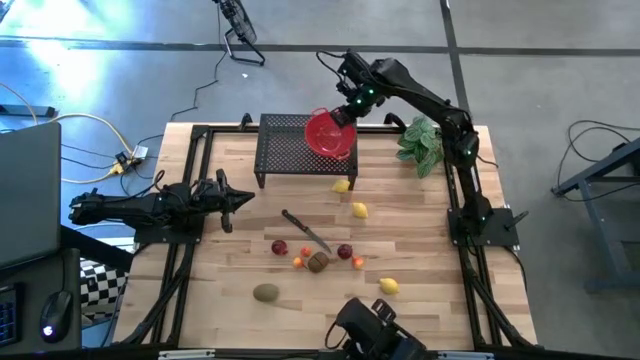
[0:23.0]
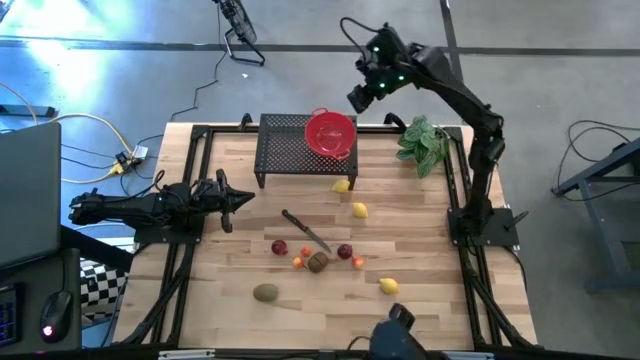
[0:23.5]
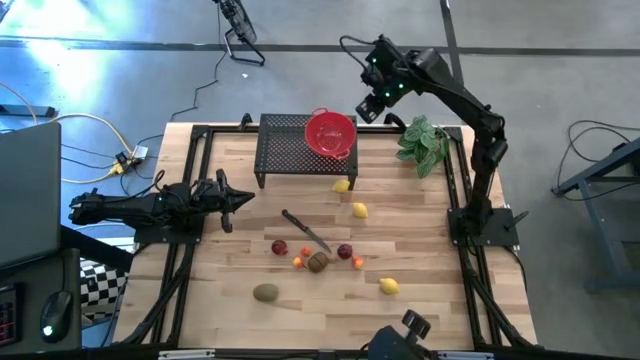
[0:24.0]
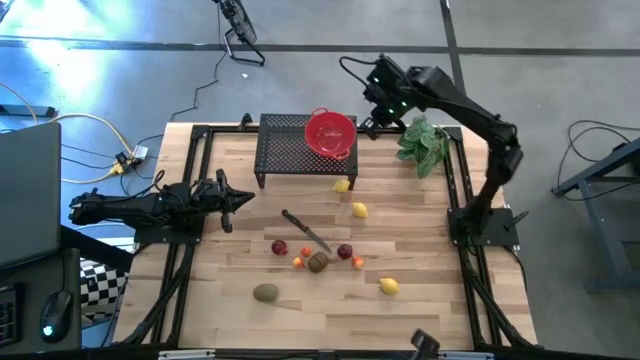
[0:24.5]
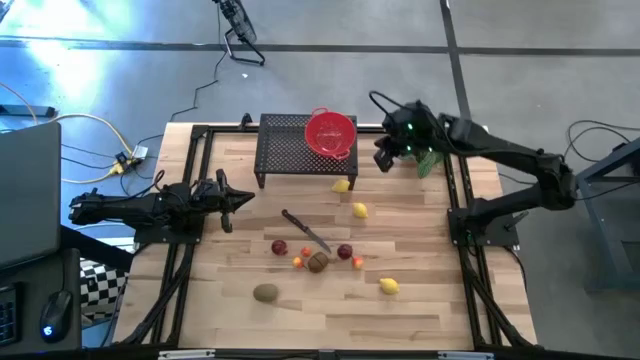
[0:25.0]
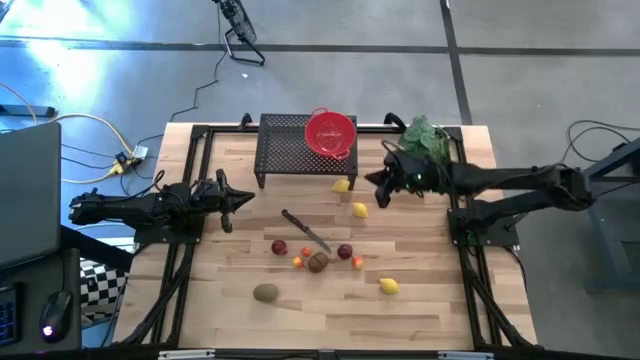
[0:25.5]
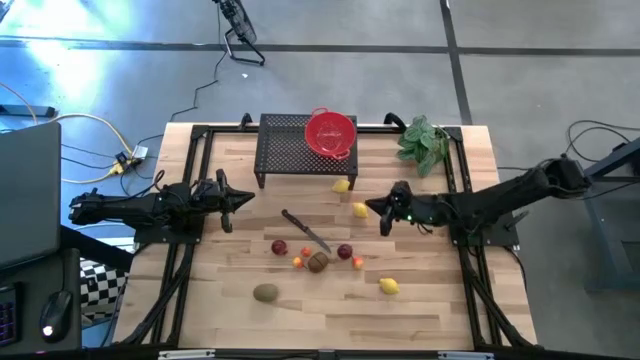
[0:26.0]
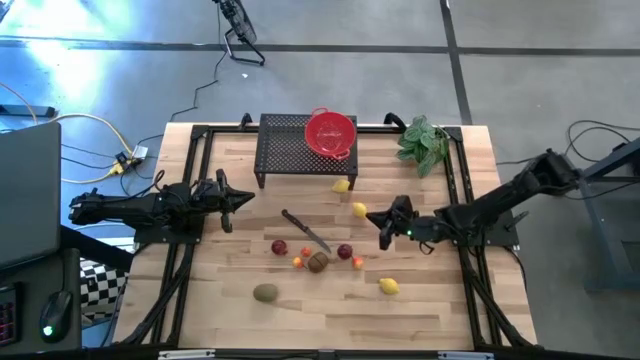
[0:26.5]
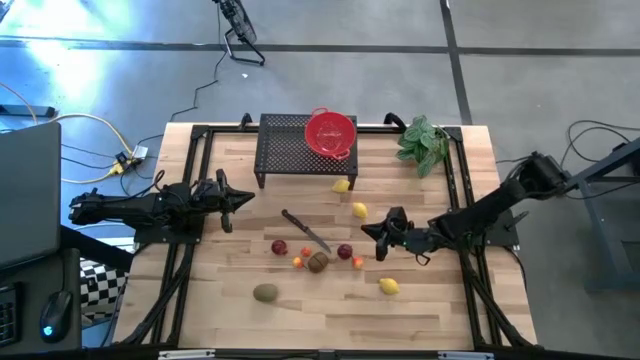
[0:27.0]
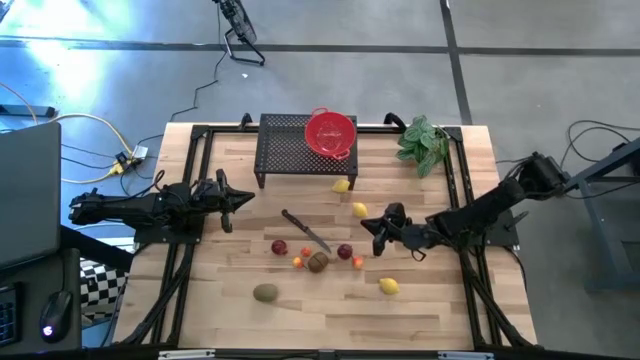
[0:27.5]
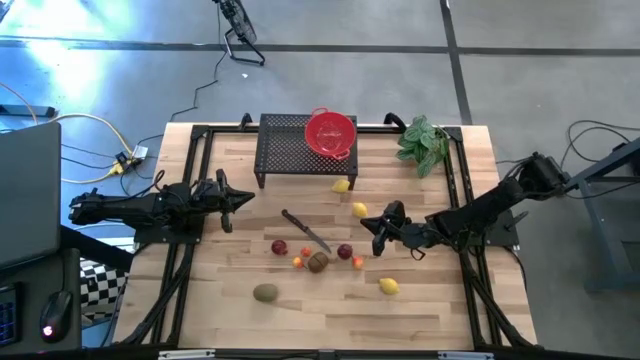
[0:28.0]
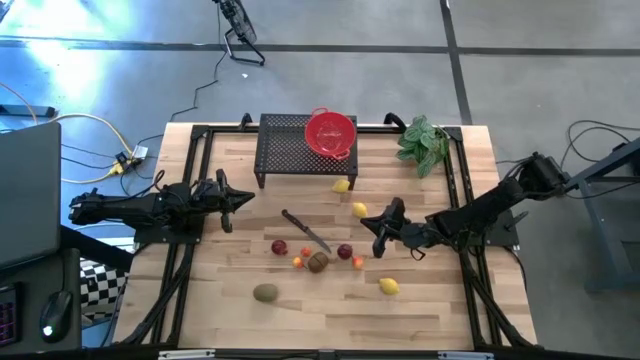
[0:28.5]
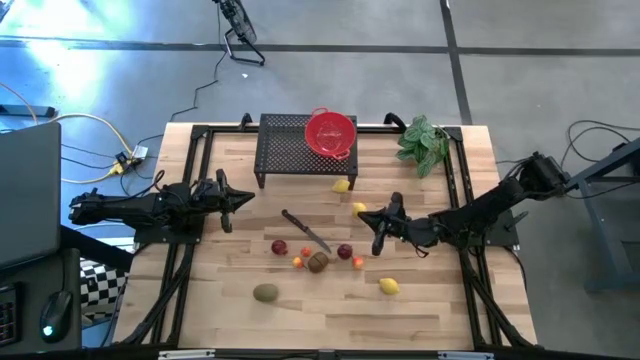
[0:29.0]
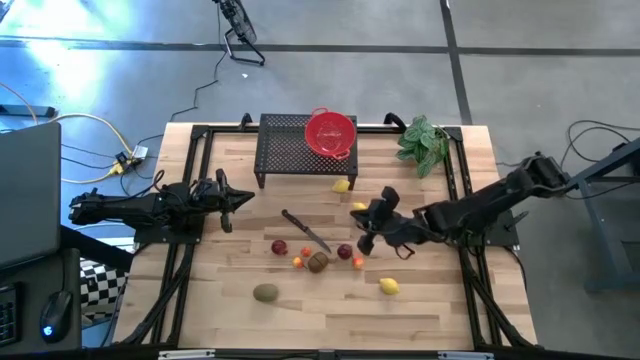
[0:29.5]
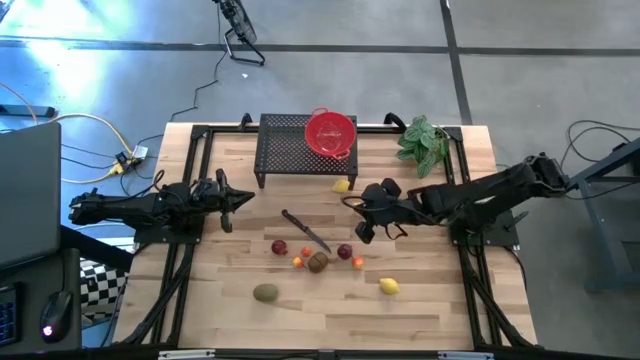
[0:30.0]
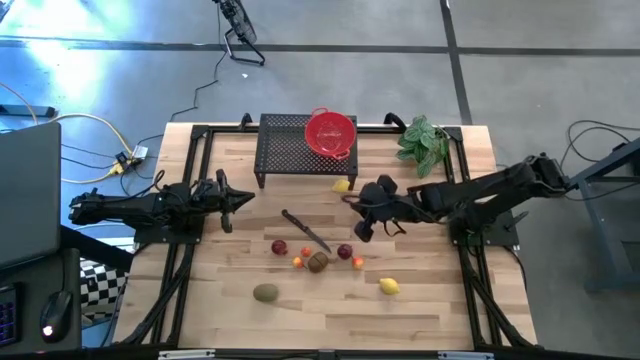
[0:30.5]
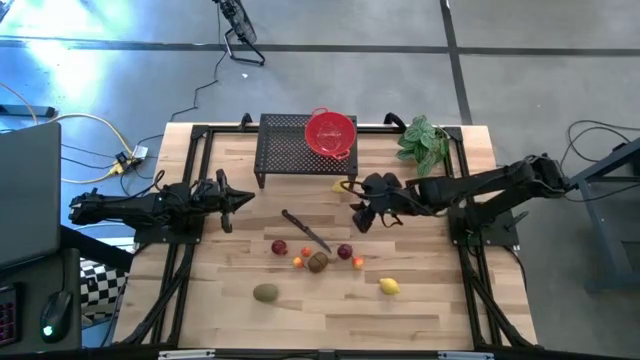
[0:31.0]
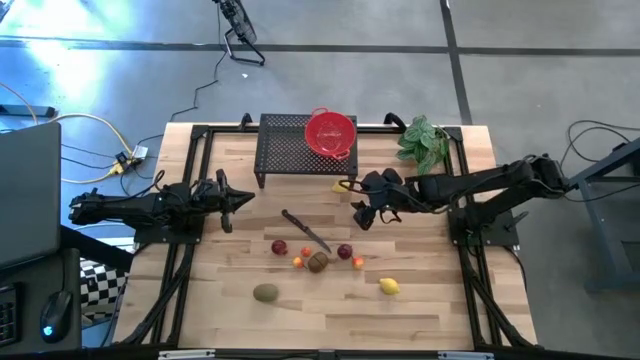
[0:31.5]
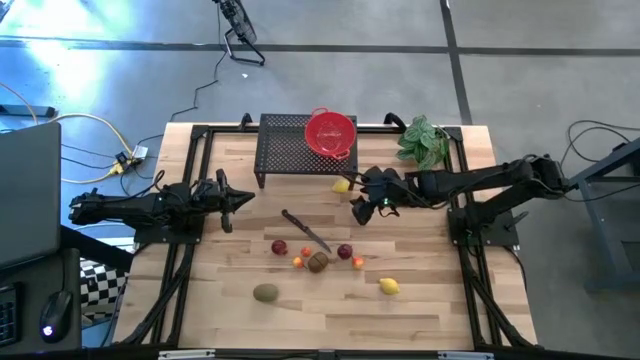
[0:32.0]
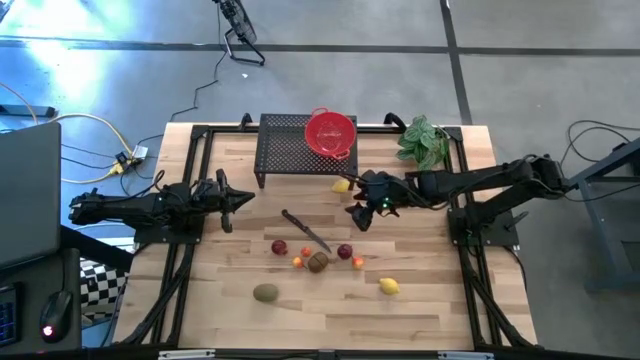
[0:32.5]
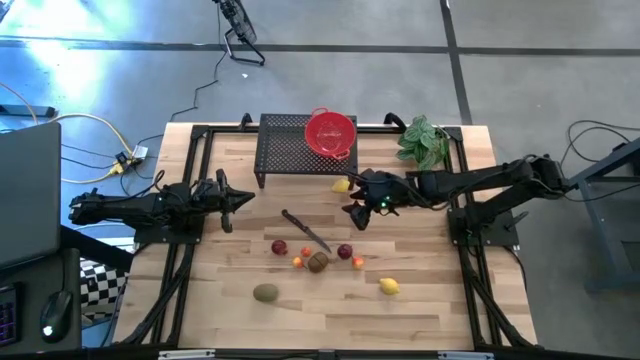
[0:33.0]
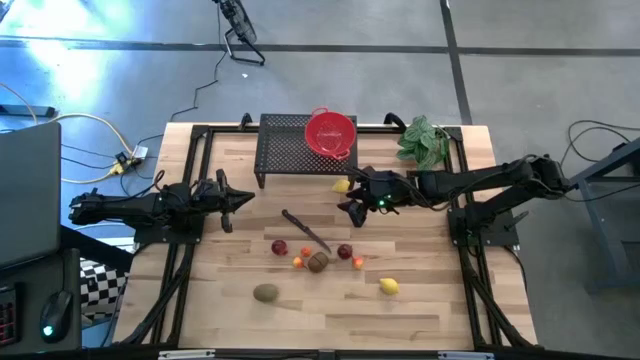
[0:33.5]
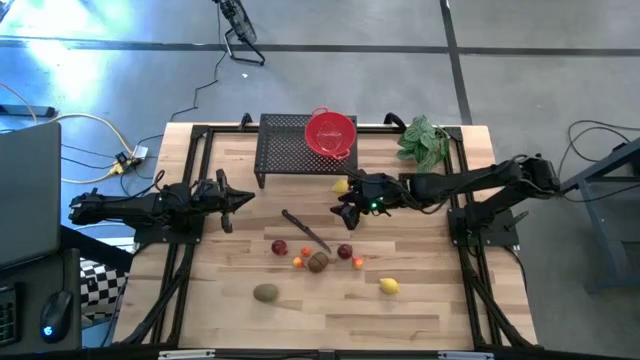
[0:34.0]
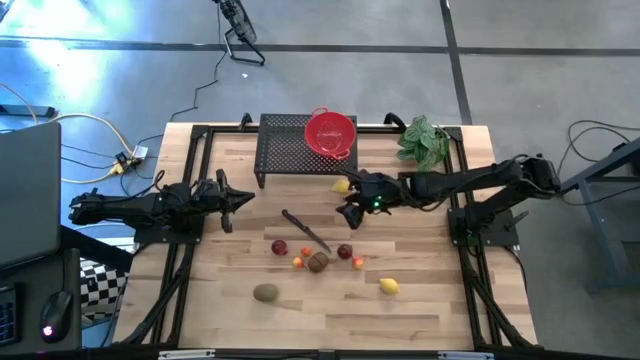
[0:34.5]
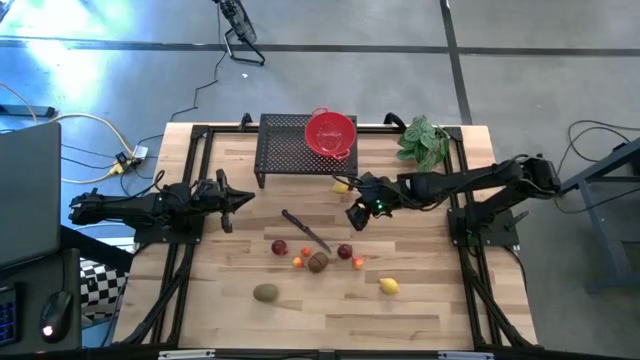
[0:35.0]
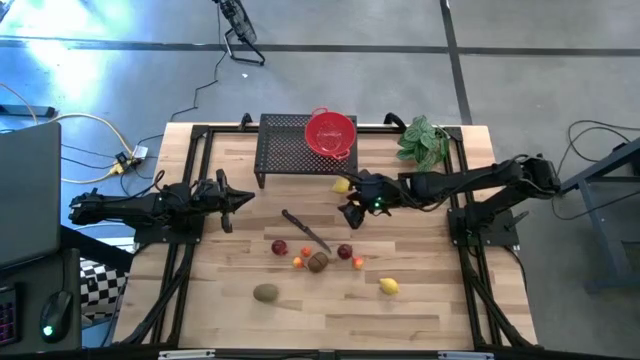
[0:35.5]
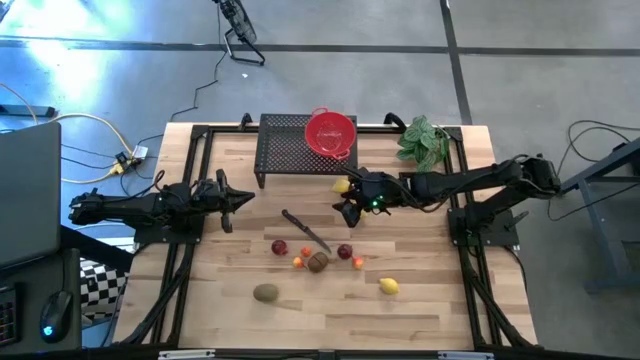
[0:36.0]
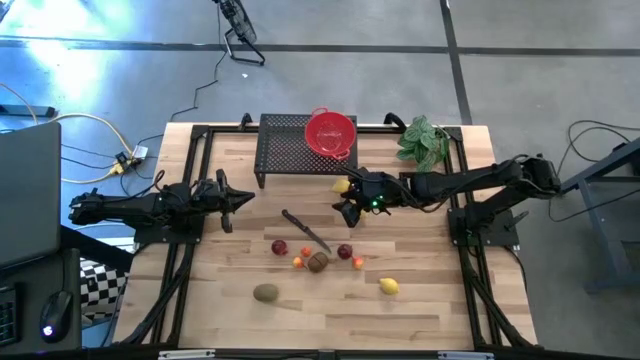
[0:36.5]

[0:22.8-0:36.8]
Task: Pick & Place Fruit
Put the middle lemon into the colander on the shelf on the shelf

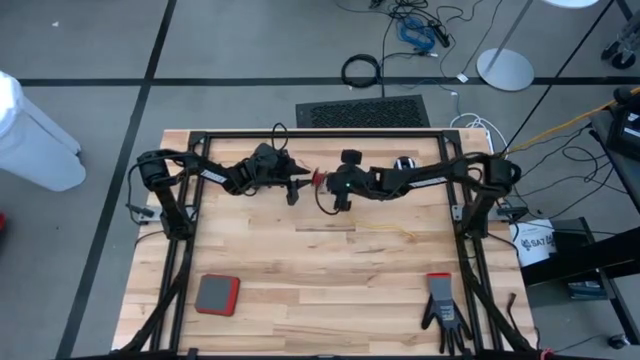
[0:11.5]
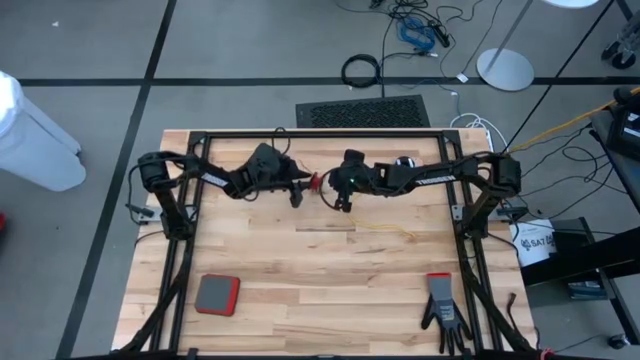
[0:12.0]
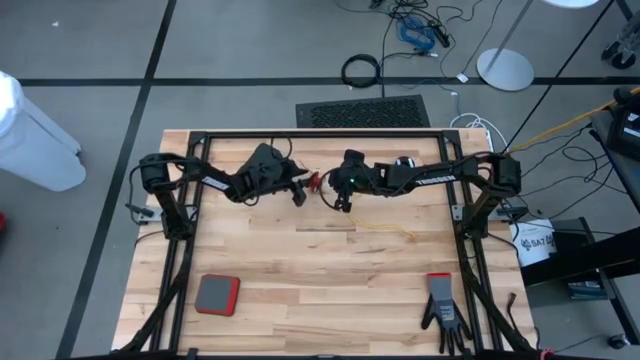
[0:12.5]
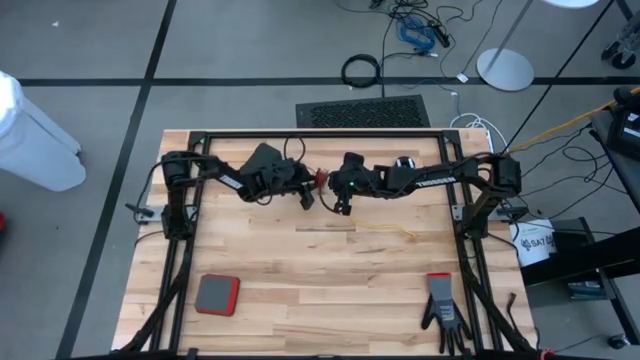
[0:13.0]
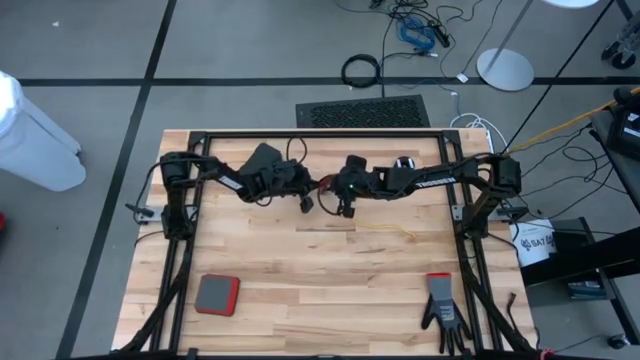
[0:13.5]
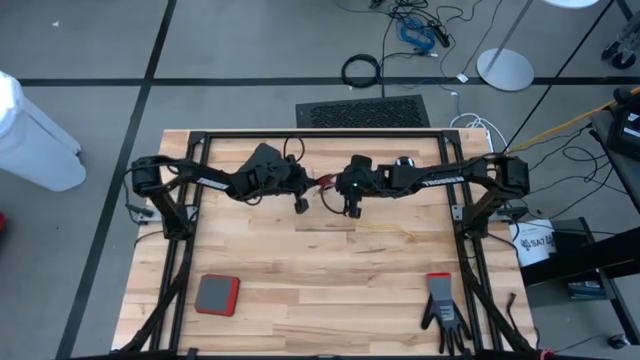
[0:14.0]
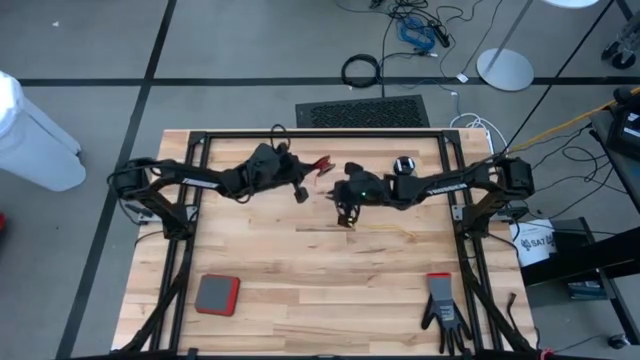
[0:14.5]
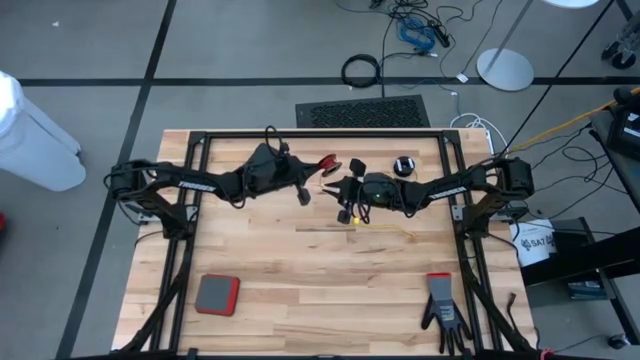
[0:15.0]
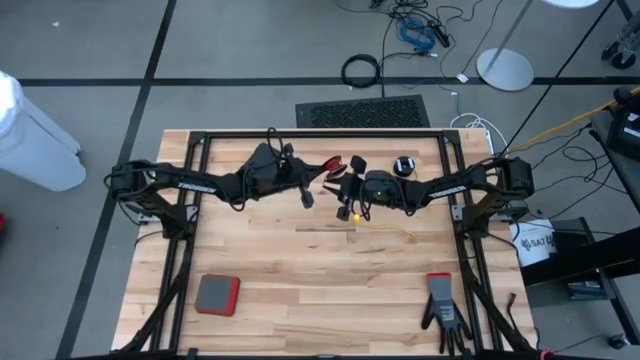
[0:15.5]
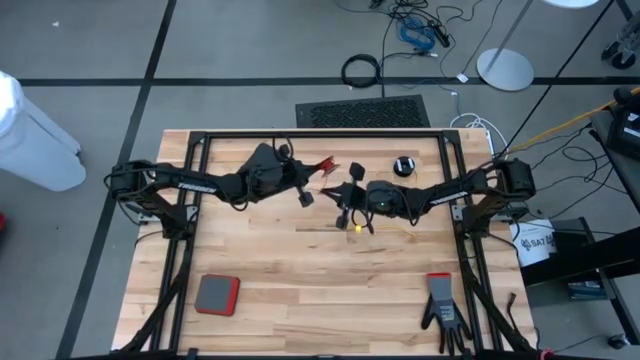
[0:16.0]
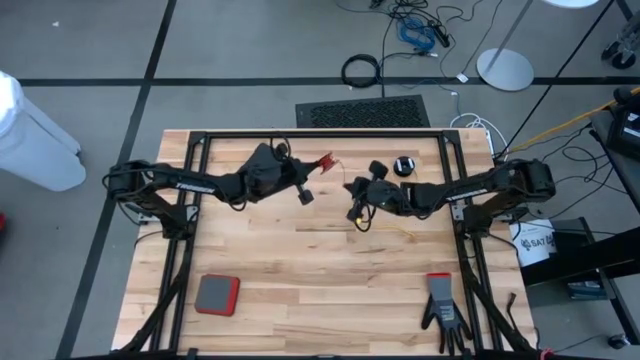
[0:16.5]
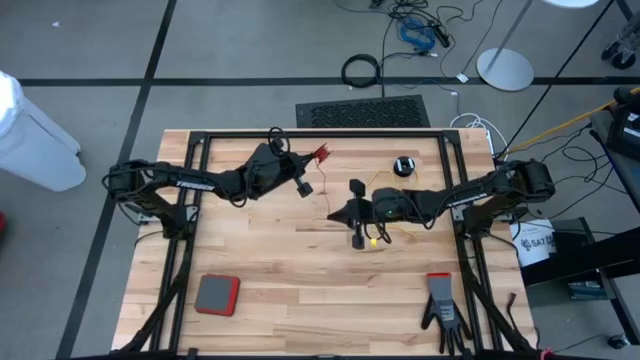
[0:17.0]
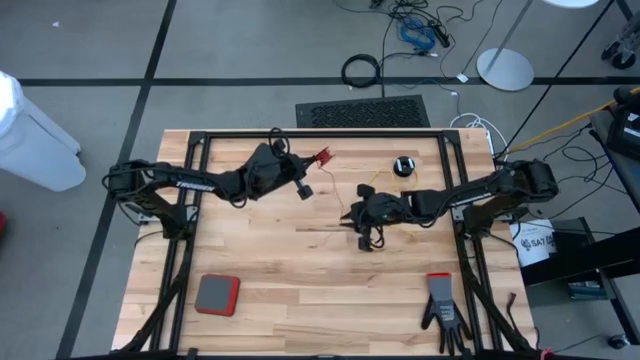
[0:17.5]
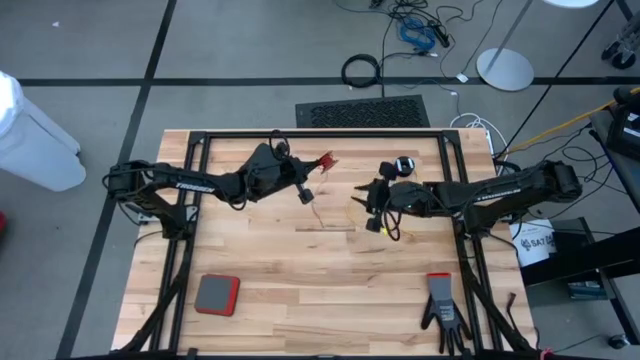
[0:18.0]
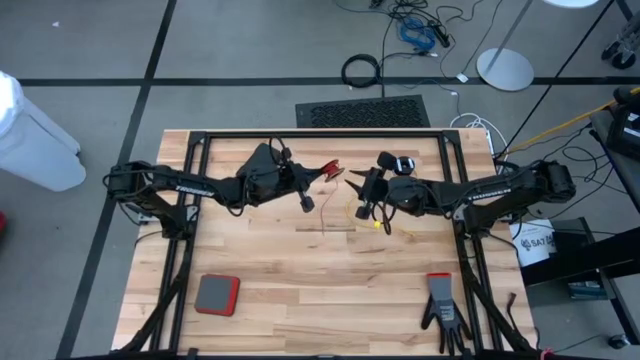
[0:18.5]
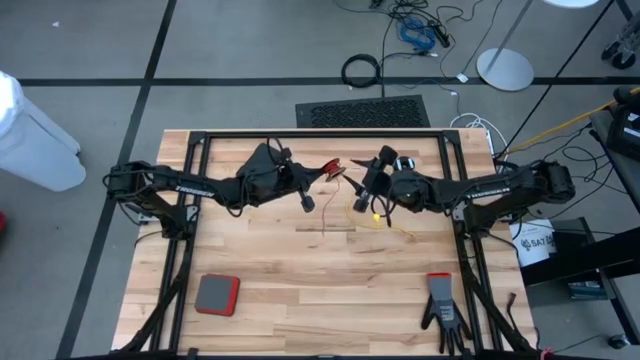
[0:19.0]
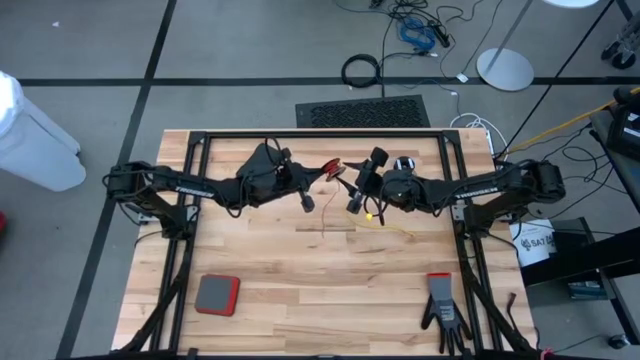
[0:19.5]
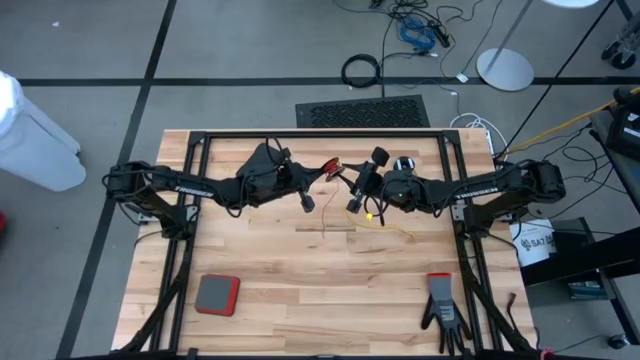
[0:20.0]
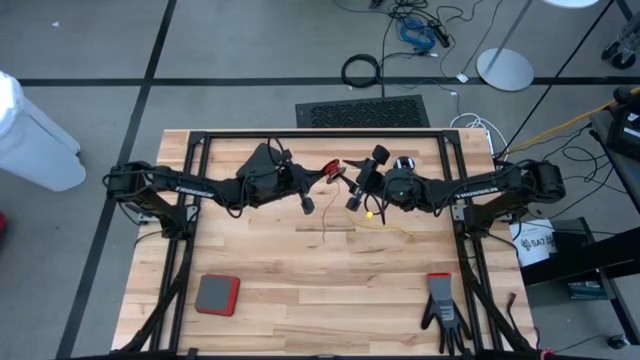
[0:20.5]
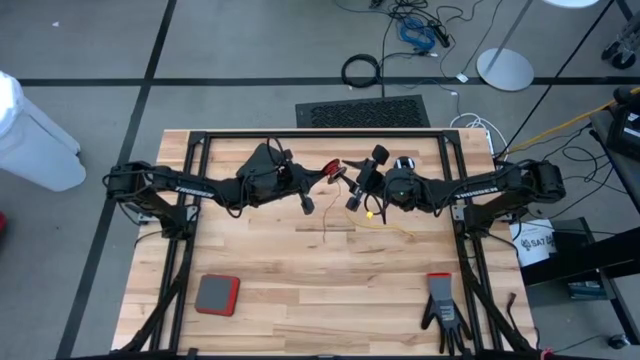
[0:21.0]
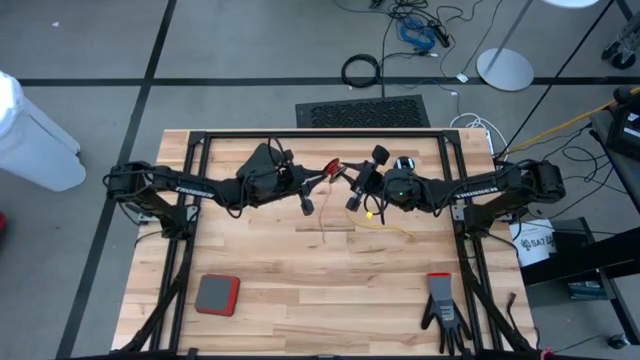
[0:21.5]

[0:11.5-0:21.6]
Task: Coil cords
Uncoil the red wire from the spool
